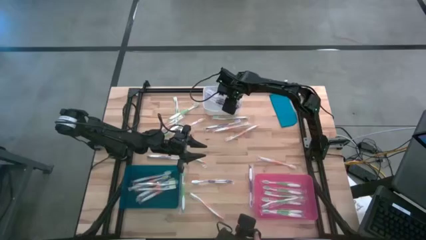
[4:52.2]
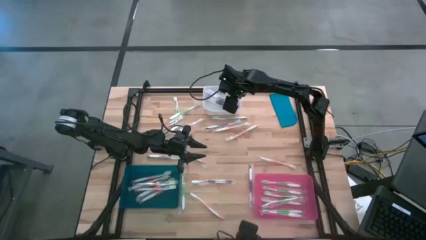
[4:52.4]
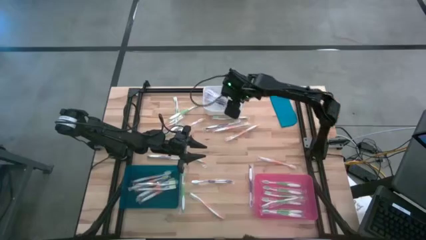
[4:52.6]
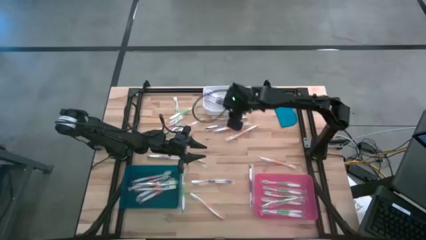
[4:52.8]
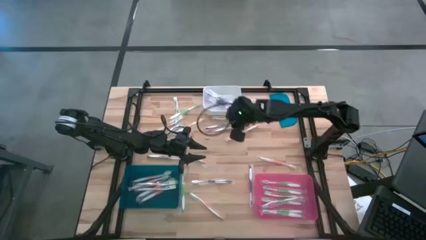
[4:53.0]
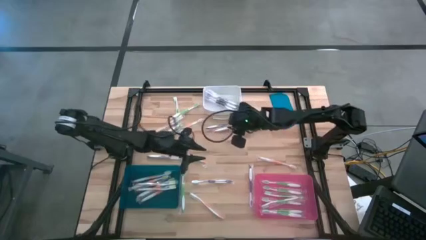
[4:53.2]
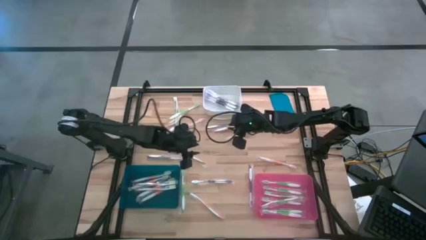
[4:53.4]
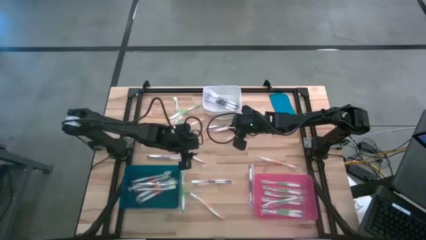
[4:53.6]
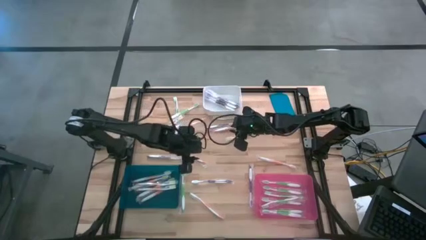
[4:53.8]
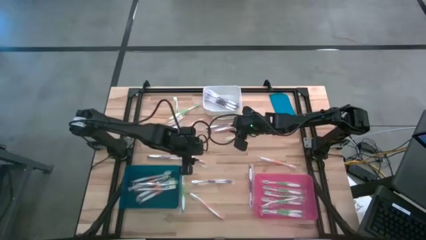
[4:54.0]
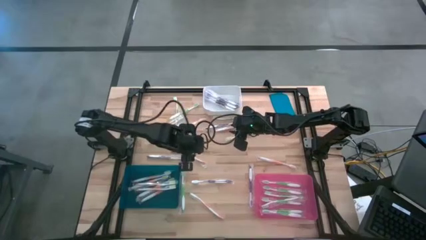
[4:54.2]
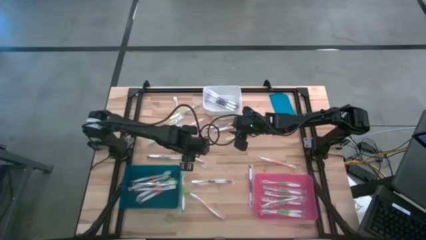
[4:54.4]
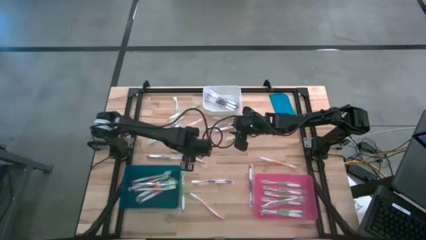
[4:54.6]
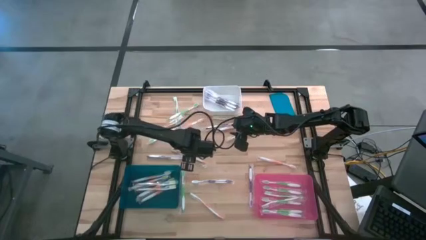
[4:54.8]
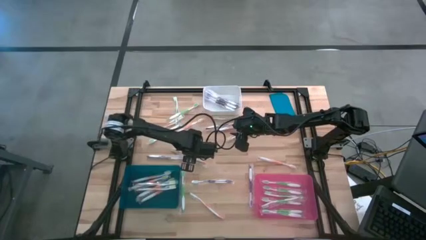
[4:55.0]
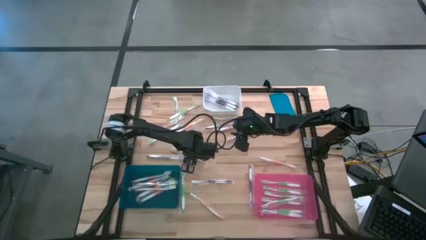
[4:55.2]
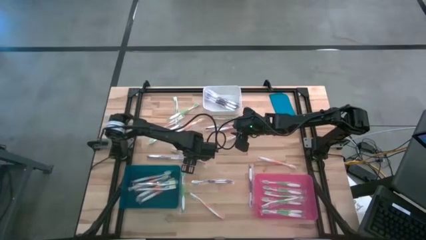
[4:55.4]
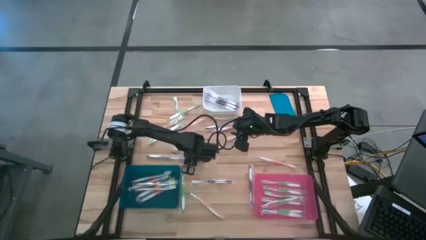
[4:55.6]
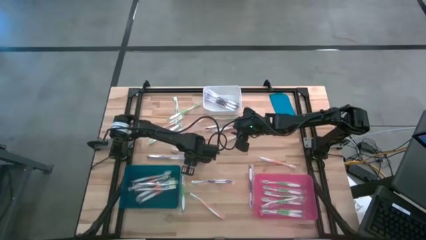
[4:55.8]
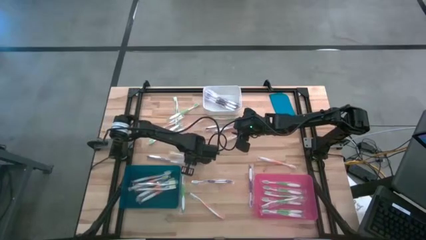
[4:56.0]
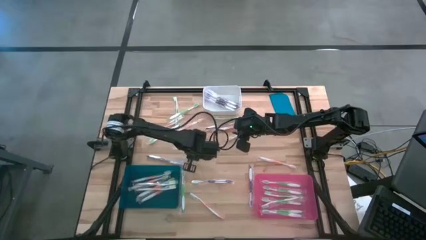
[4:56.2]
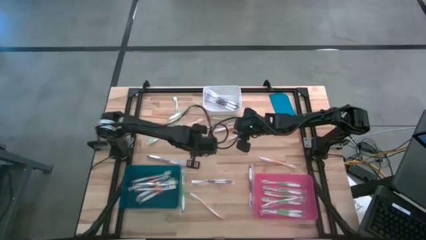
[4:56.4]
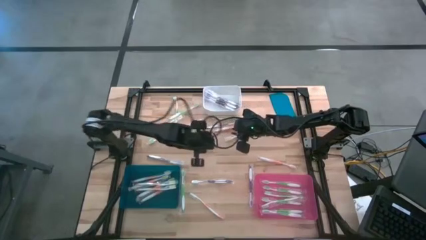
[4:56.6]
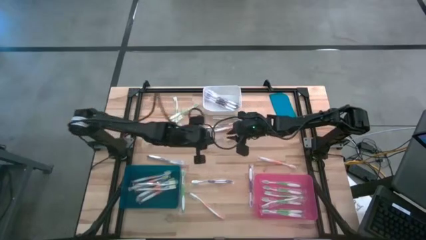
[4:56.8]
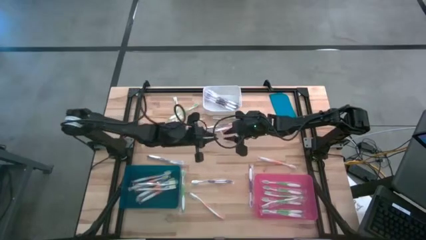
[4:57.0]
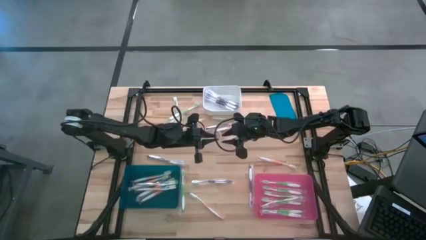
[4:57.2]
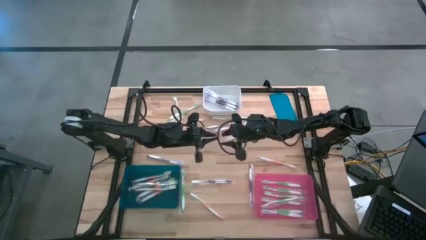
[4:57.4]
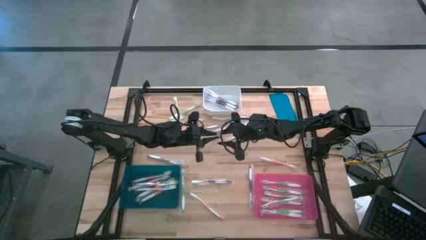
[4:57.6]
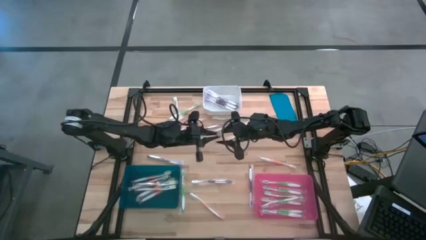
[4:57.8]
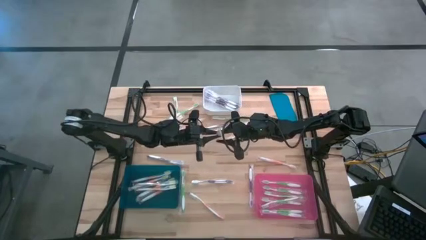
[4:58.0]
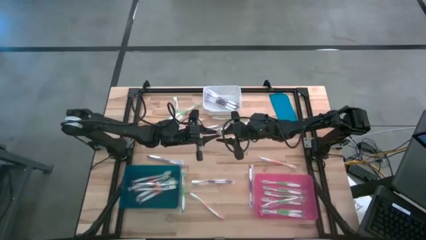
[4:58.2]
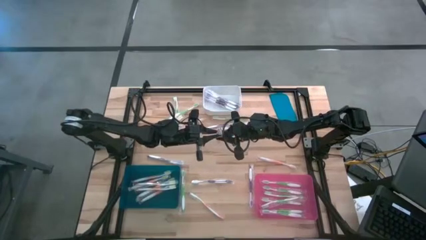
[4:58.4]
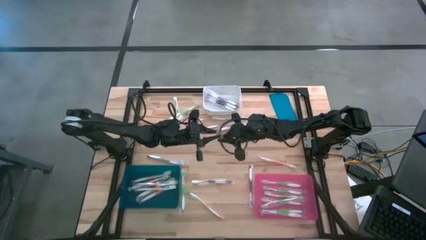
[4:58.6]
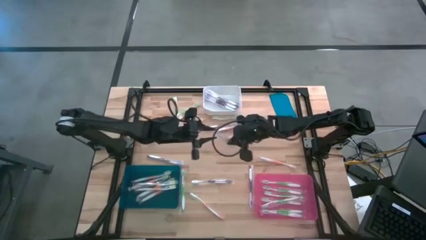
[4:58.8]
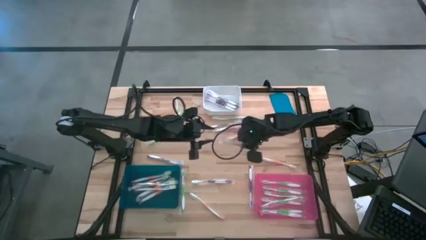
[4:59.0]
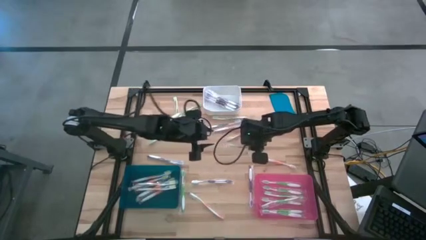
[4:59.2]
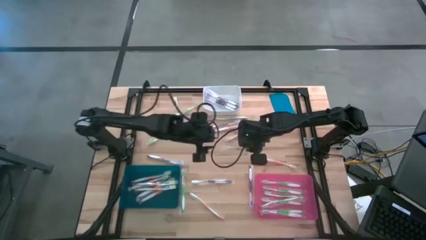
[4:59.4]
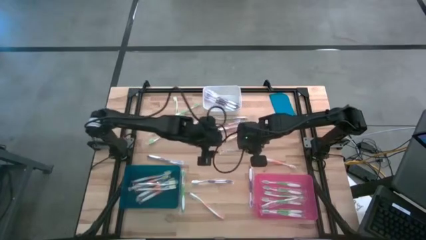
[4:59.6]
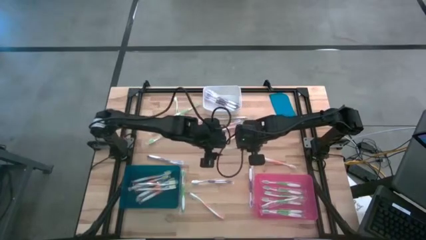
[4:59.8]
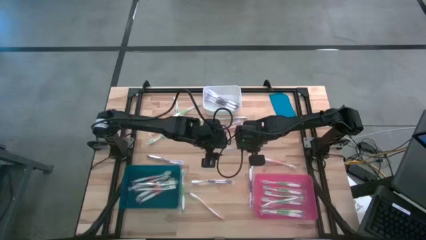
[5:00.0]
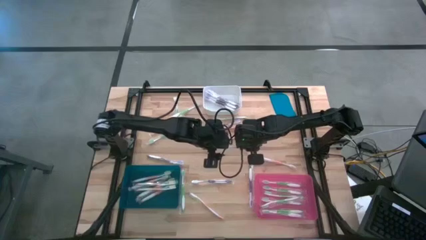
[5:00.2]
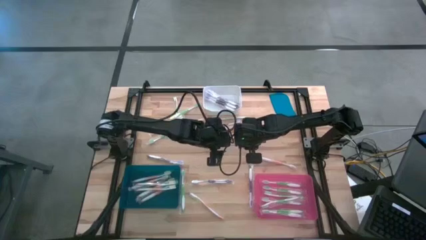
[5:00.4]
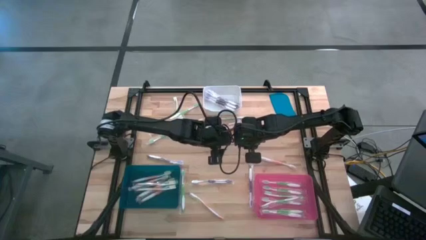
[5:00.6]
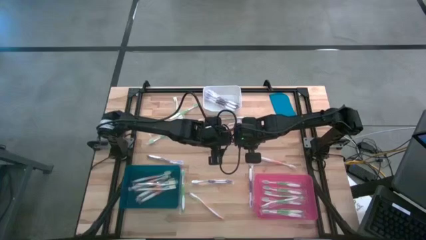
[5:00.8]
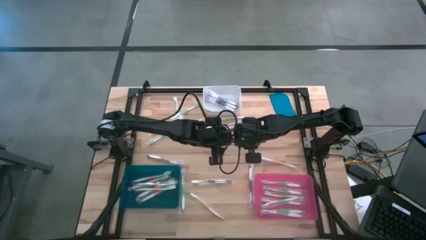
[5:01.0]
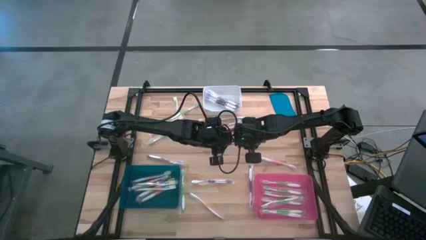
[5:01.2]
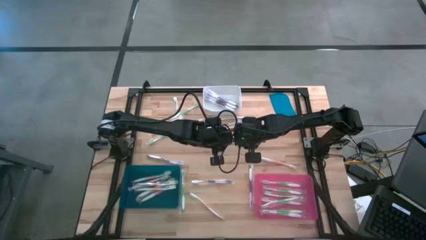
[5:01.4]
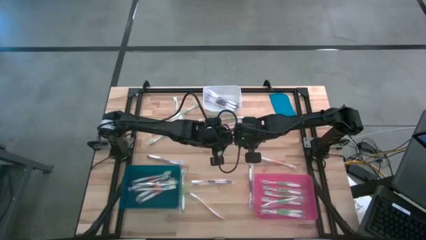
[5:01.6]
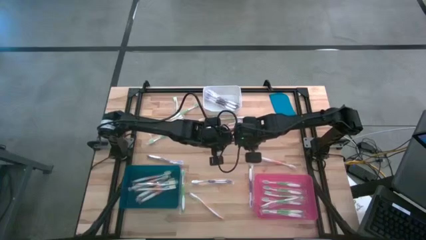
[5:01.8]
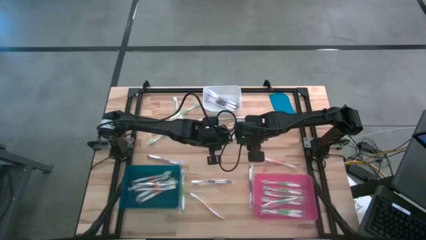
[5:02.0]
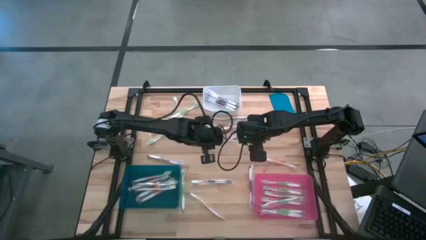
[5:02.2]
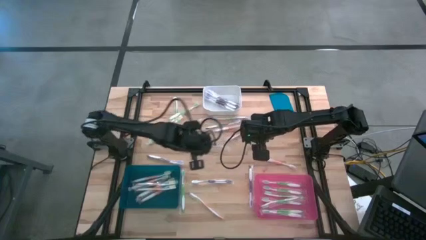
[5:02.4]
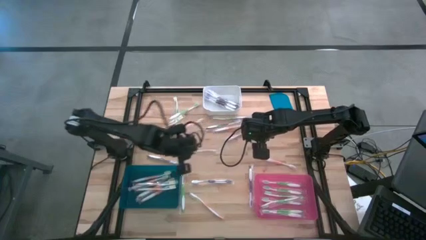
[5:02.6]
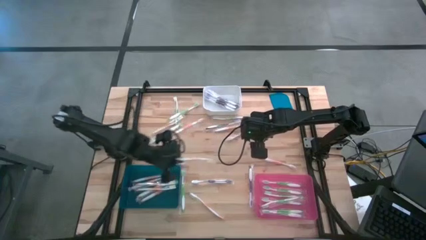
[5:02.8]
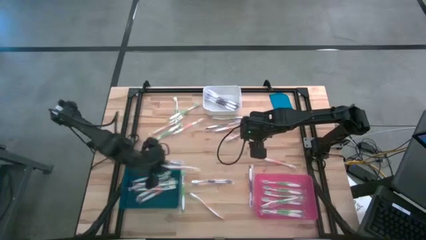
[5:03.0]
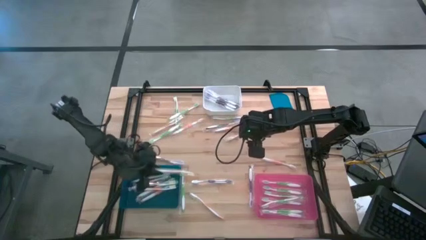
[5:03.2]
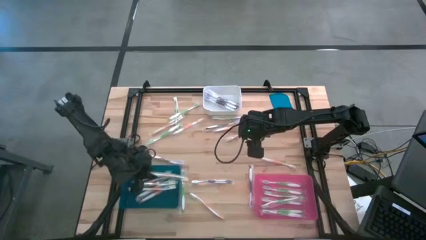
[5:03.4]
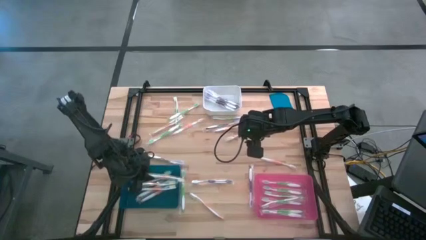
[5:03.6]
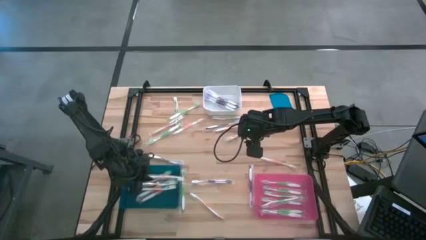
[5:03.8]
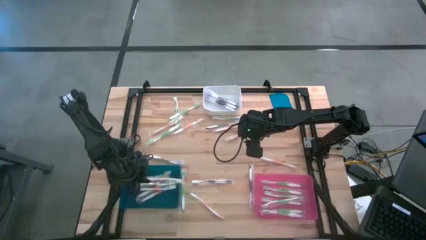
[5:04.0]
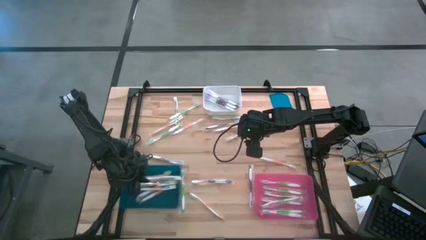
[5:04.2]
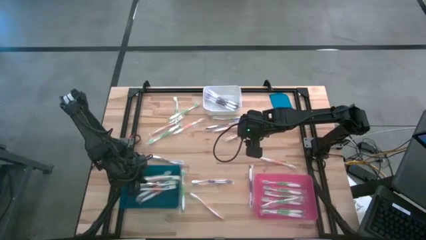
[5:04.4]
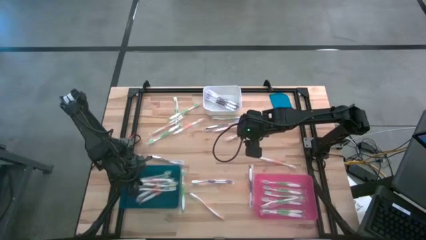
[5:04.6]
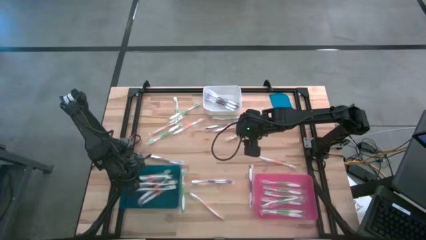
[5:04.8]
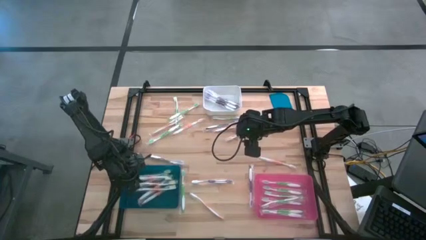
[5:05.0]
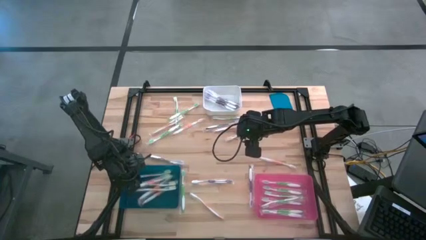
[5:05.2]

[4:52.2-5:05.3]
Task: Pick & Place Toothbrushes
Put the orange toothbrush into the blue bin
